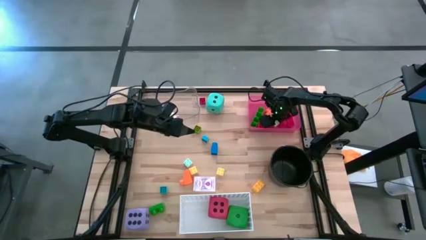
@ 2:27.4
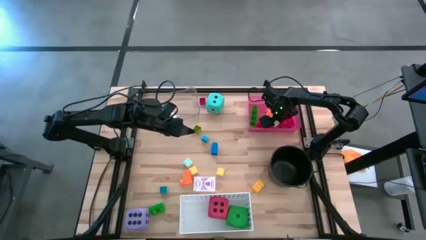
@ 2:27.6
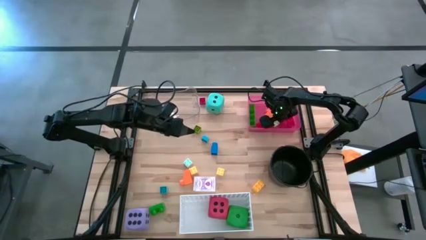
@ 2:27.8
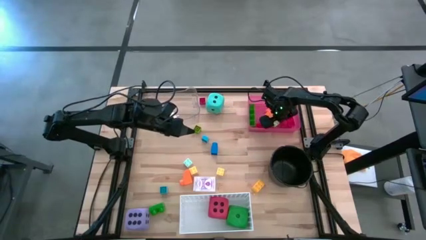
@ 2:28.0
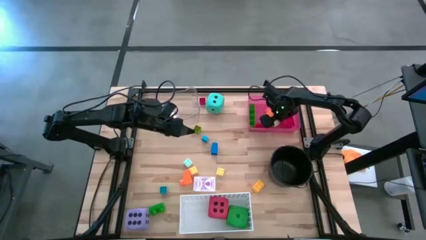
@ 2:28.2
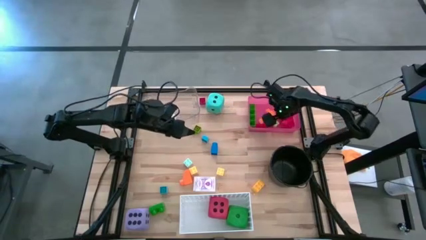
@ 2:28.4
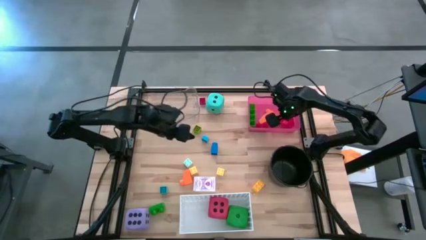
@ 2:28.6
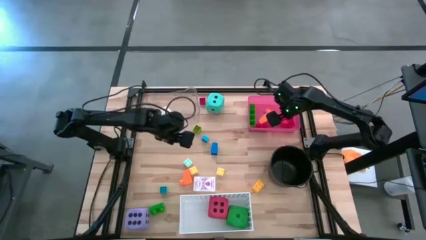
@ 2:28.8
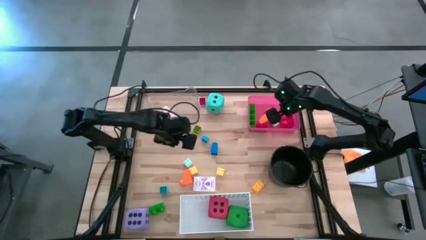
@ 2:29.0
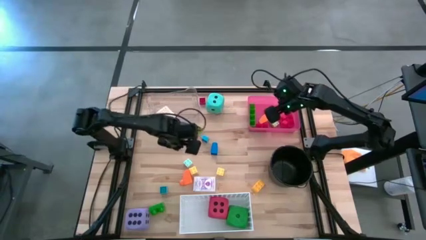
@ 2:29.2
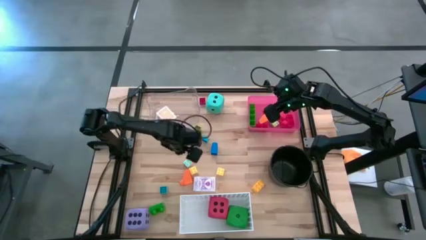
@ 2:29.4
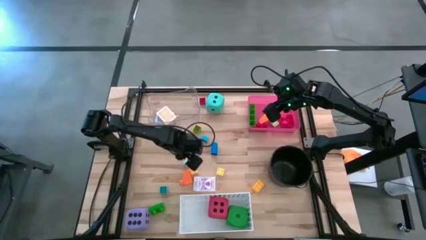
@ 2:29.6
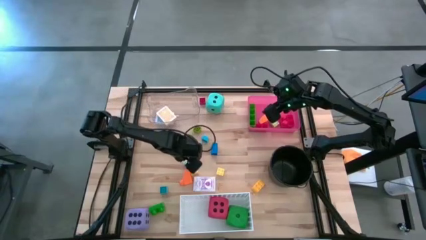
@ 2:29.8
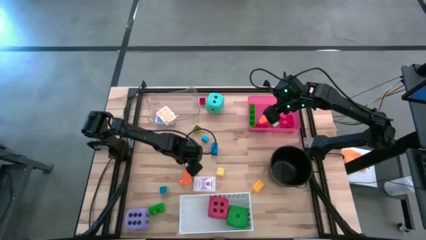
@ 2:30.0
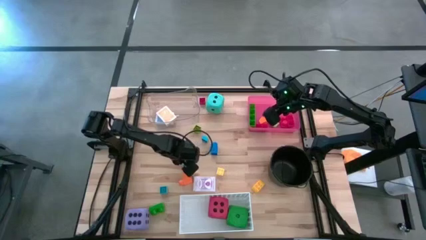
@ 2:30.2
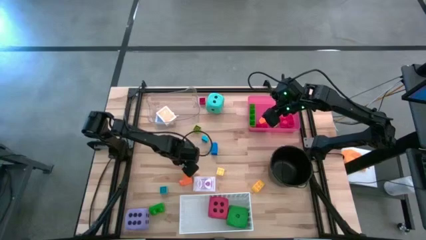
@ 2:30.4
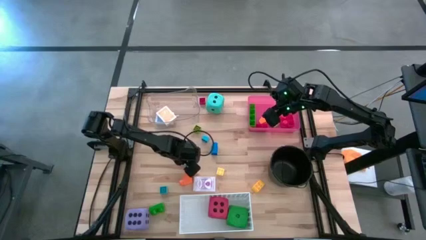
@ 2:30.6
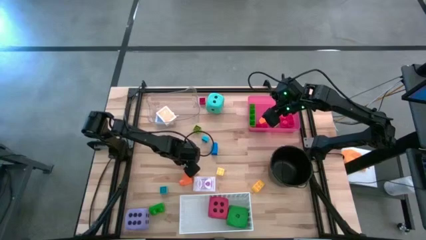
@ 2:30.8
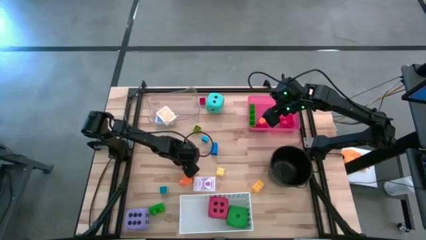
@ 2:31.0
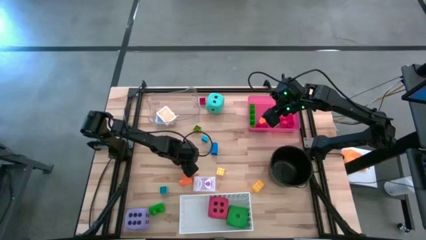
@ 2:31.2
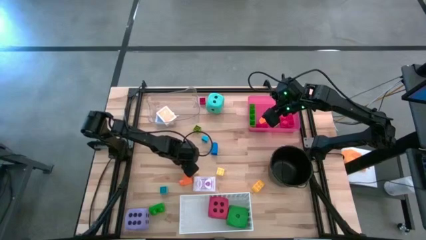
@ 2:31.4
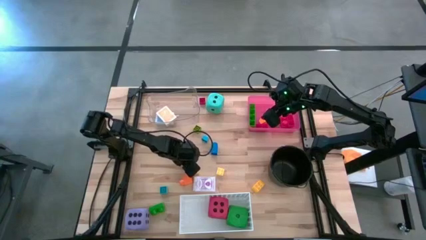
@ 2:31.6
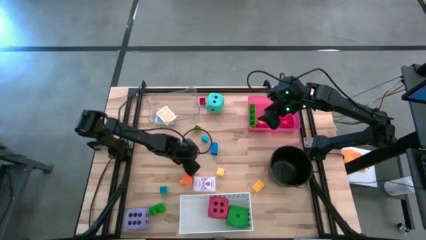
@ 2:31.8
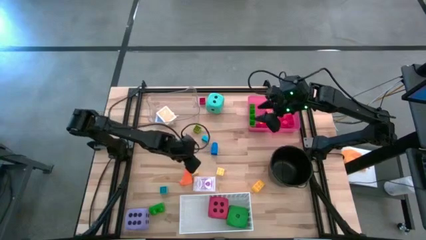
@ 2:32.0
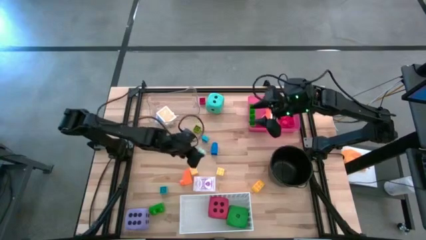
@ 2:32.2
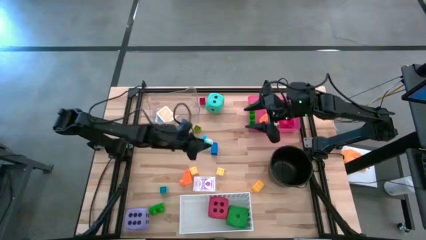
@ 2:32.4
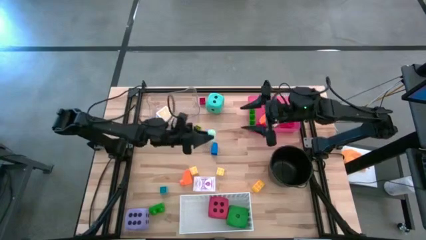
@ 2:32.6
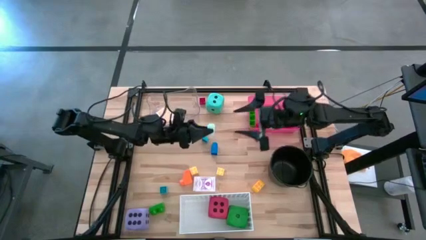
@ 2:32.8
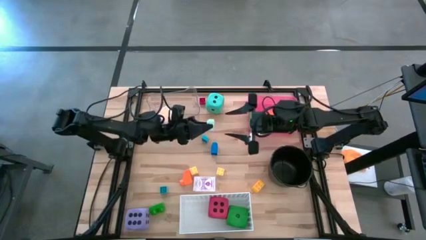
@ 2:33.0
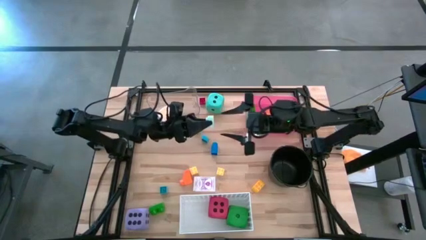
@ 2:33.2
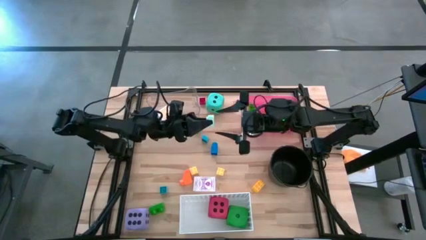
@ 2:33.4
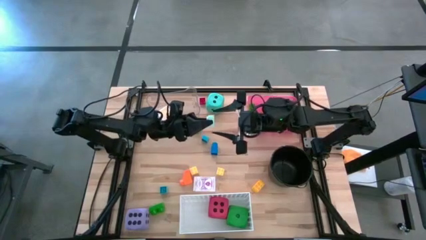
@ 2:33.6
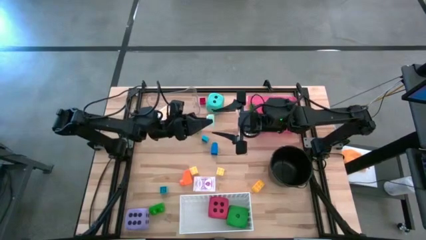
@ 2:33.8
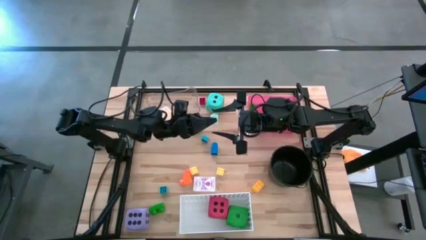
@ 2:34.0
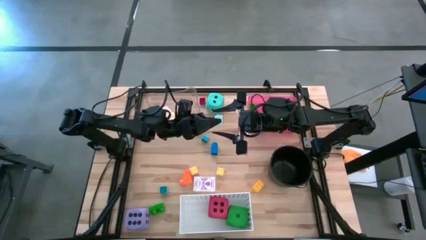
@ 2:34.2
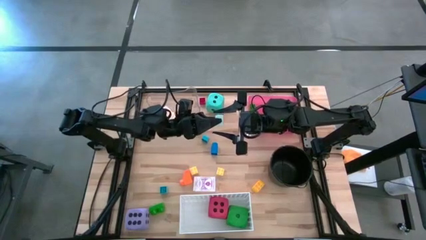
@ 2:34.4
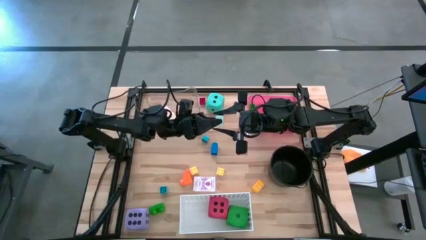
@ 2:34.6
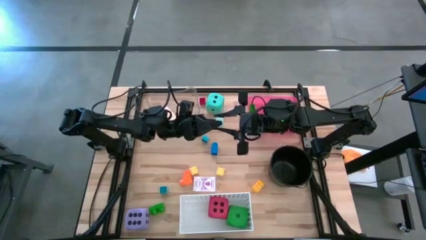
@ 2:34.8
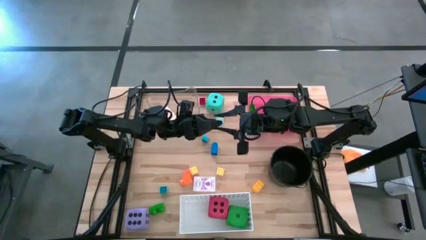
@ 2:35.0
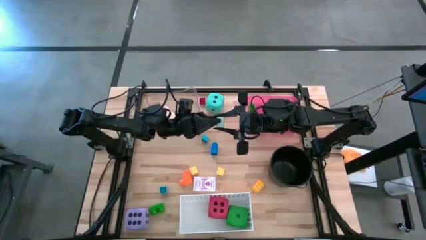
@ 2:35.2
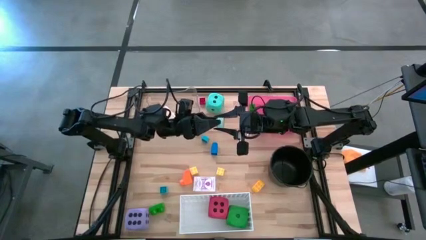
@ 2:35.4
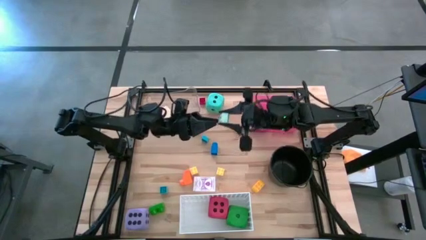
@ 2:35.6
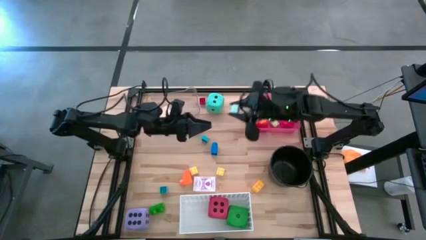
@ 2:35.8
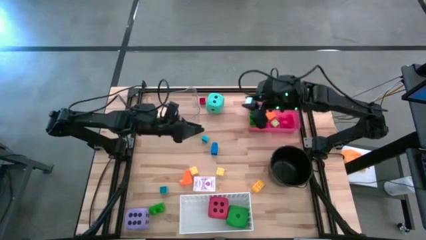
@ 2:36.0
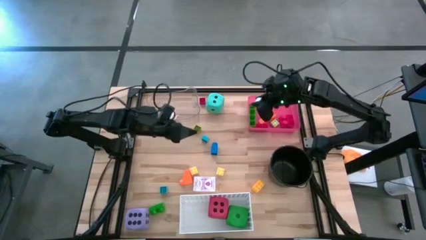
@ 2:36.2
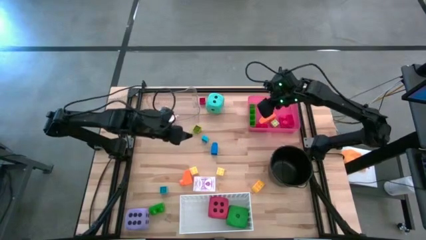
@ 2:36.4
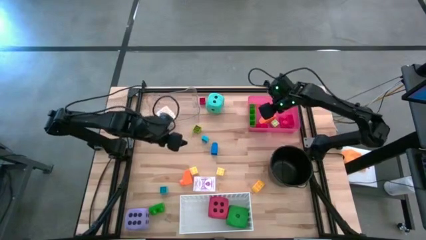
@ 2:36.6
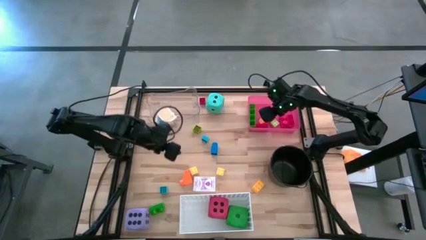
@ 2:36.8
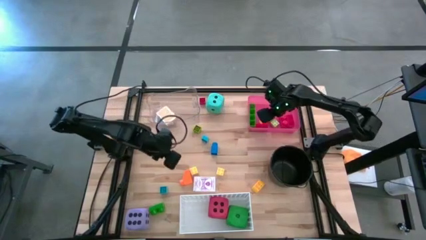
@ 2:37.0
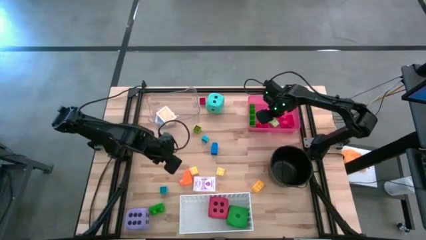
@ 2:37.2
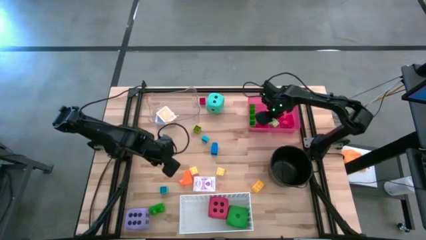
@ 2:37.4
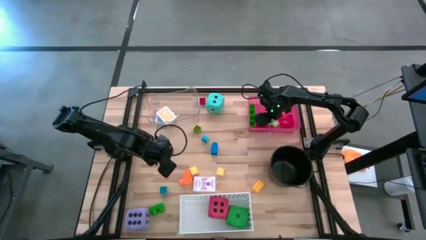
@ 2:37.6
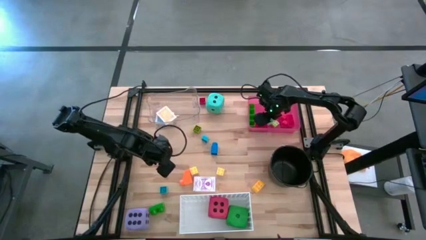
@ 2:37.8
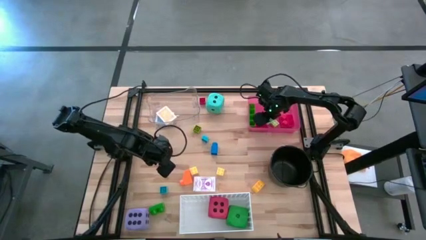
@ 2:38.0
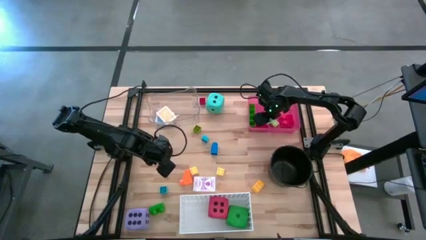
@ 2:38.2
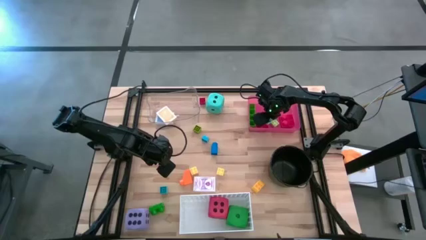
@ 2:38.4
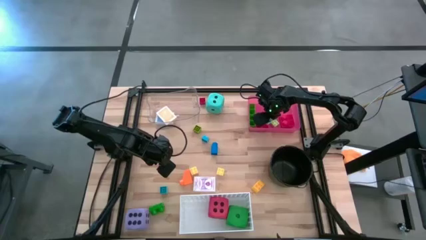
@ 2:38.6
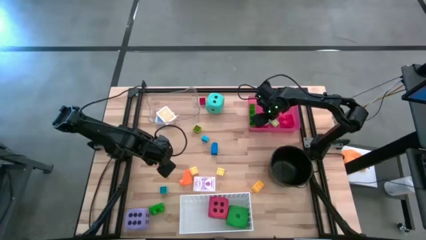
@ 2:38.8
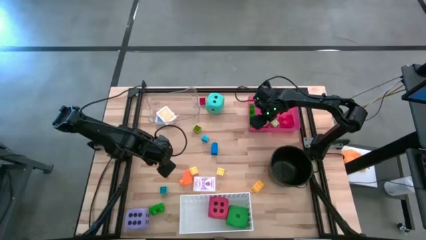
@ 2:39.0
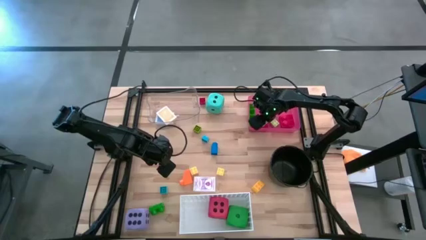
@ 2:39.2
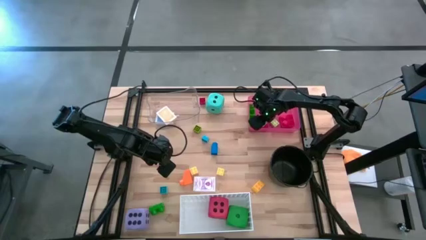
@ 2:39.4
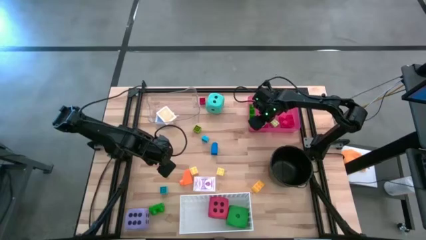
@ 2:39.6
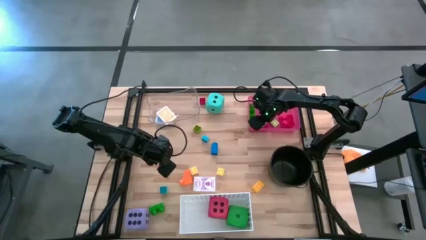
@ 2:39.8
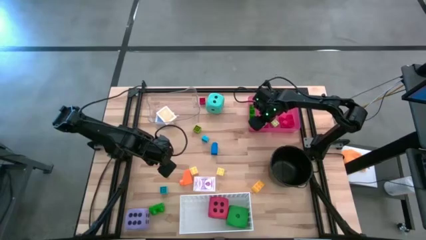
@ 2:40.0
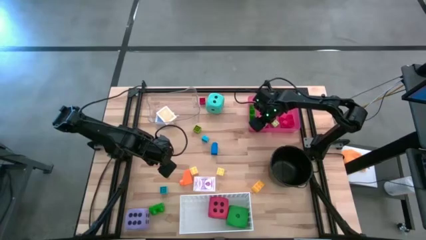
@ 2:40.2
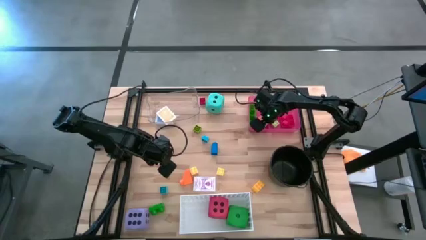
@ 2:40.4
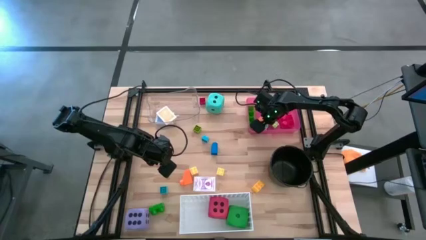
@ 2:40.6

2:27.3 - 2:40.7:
Task: Pick & Place Toys
Put the light blue game piece into the red bin

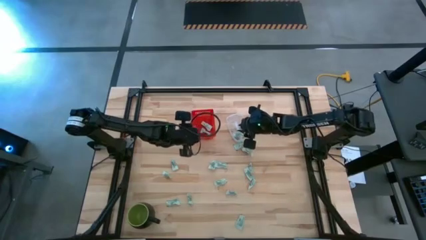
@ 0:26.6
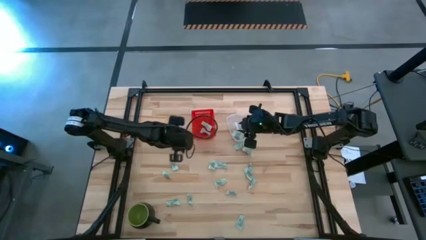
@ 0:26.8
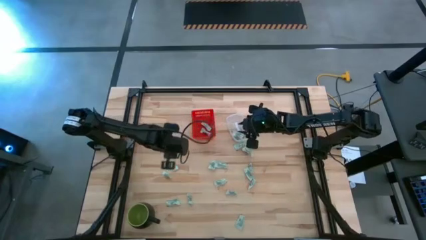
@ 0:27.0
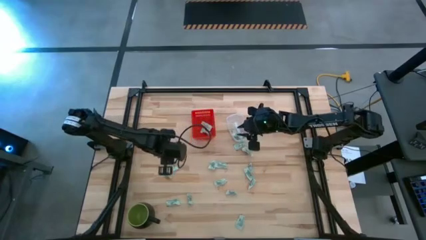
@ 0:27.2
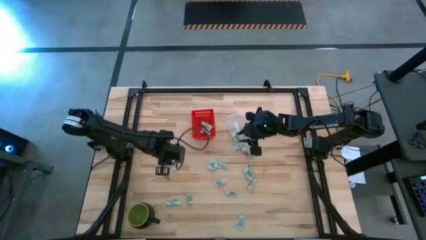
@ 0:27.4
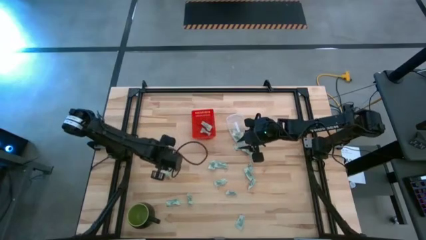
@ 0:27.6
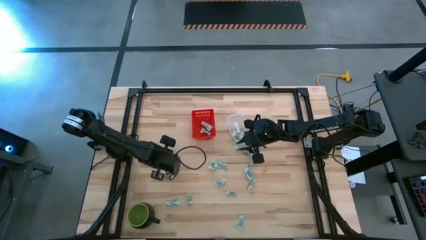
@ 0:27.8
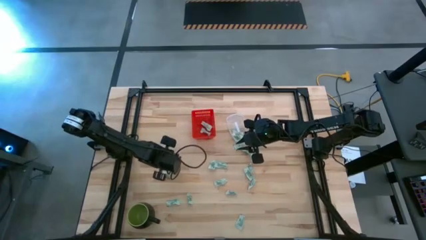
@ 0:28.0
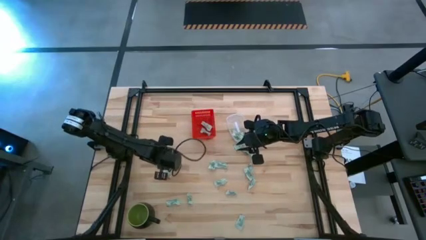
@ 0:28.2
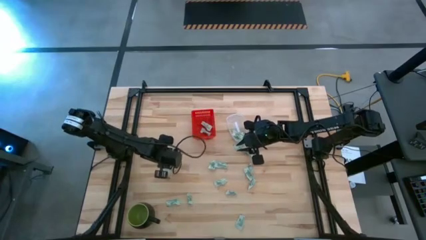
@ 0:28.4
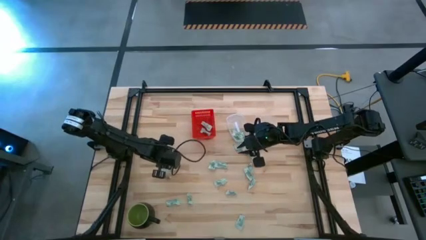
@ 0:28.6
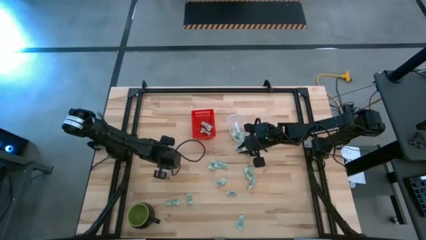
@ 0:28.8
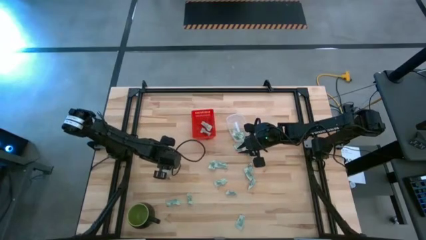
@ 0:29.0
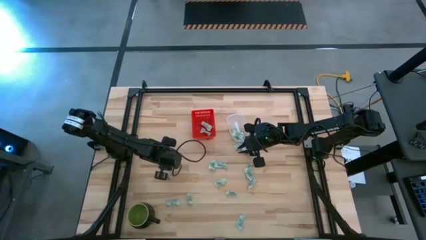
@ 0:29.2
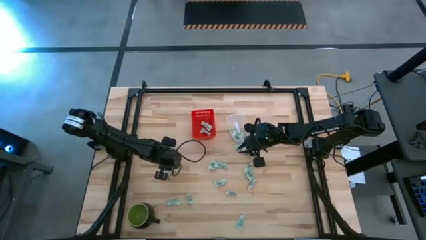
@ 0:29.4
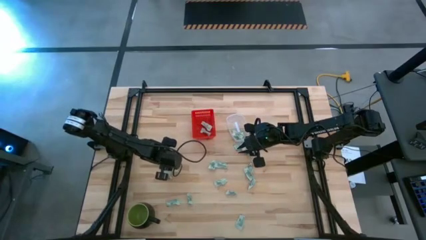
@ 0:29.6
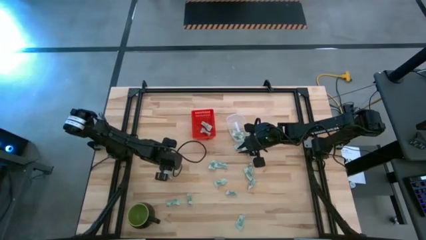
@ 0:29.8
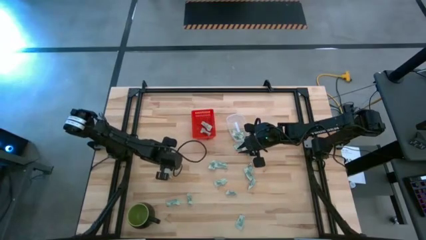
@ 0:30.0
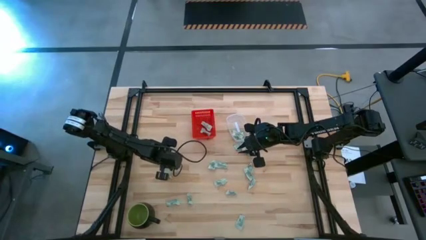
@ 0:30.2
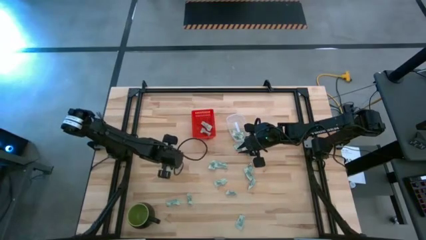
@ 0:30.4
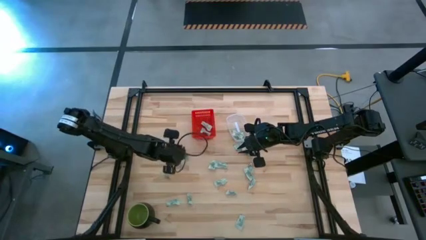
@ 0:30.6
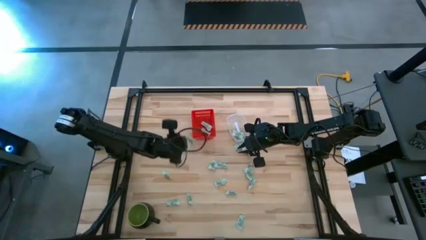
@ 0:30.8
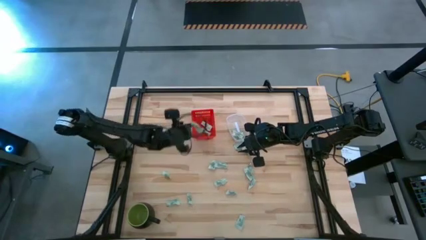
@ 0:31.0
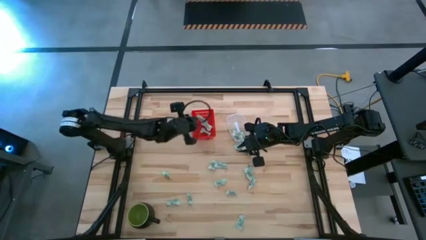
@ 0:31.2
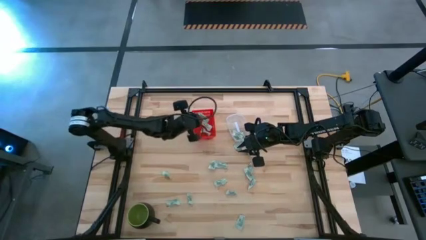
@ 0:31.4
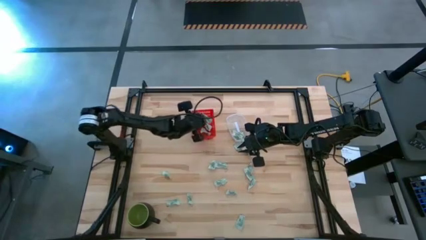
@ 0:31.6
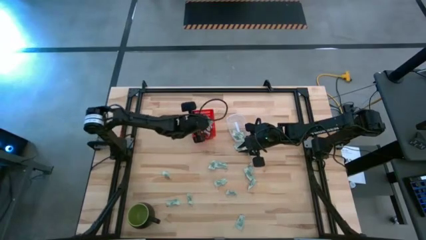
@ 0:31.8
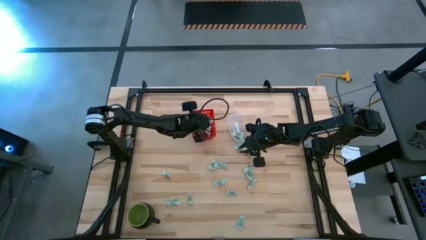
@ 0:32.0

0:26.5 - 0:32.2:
Task: Pick and place items into bin
Put the white stevia packet into the red bin
